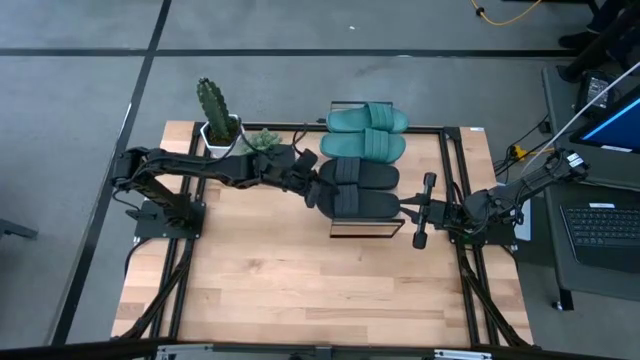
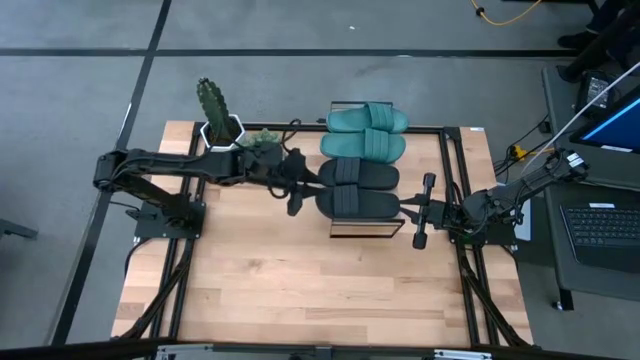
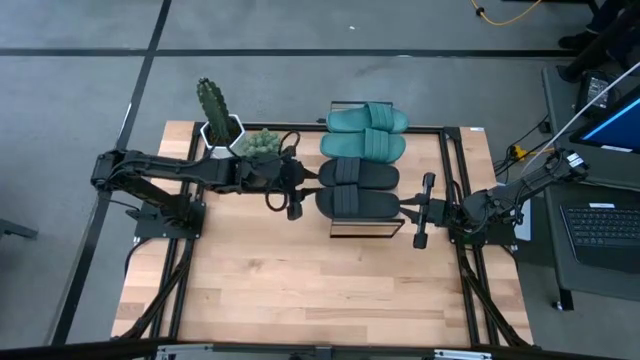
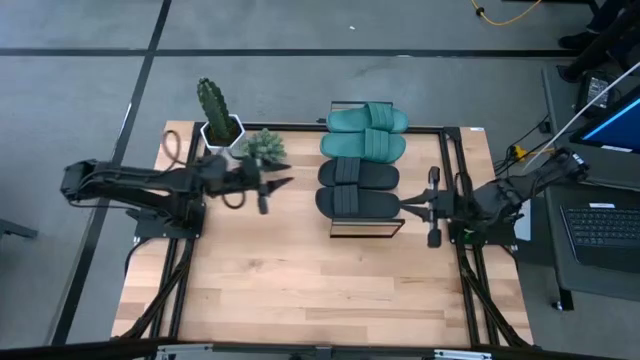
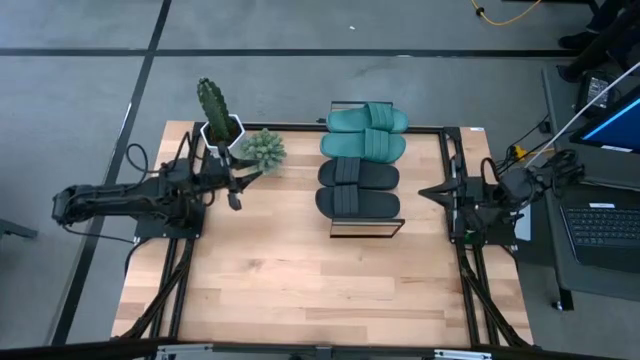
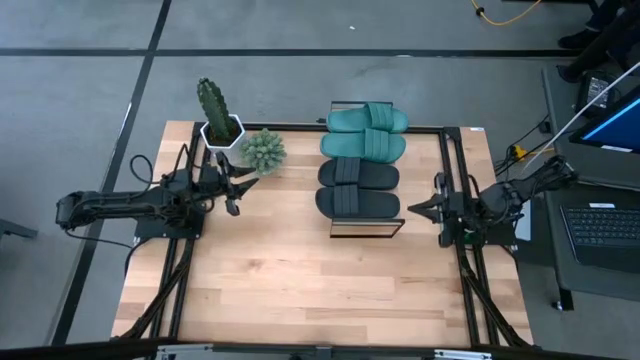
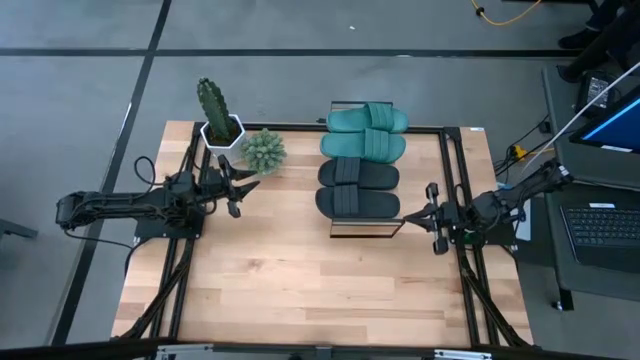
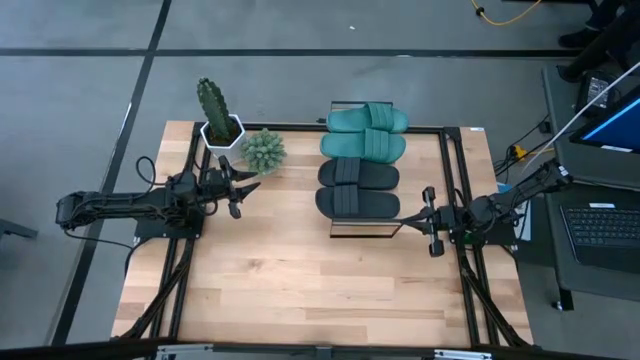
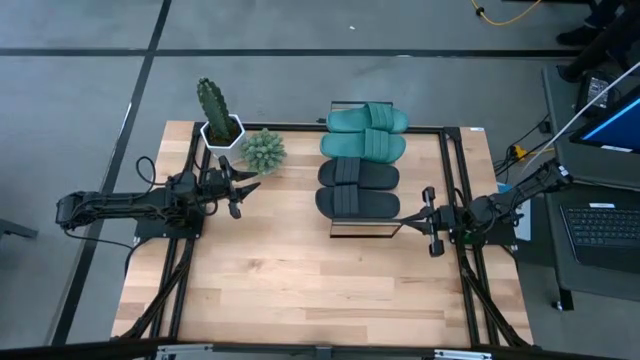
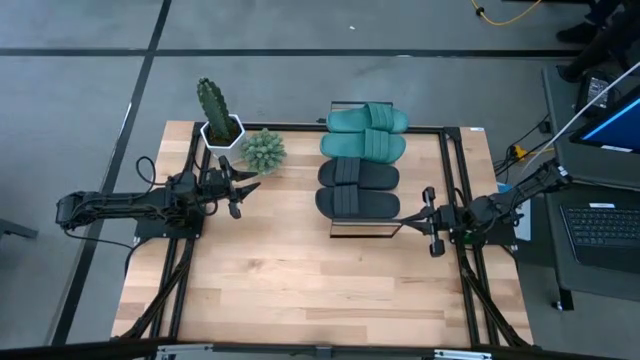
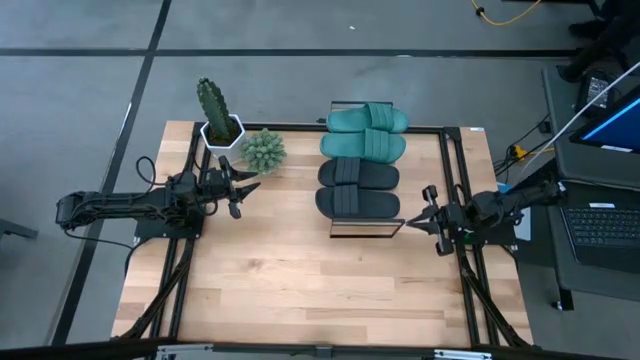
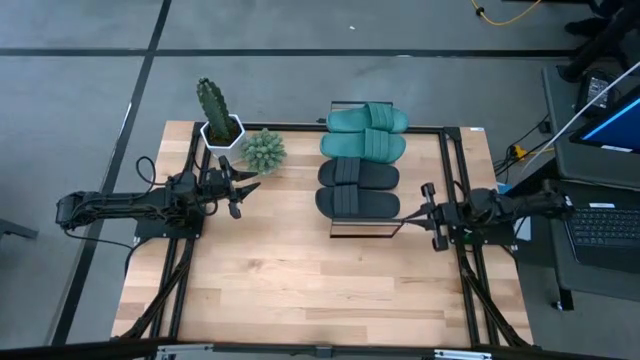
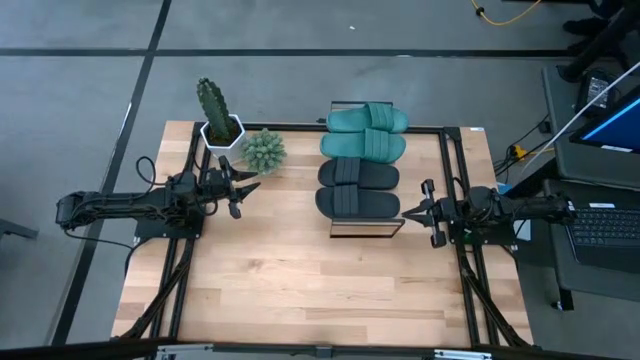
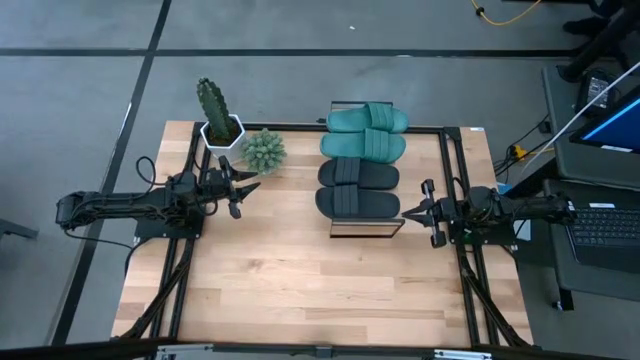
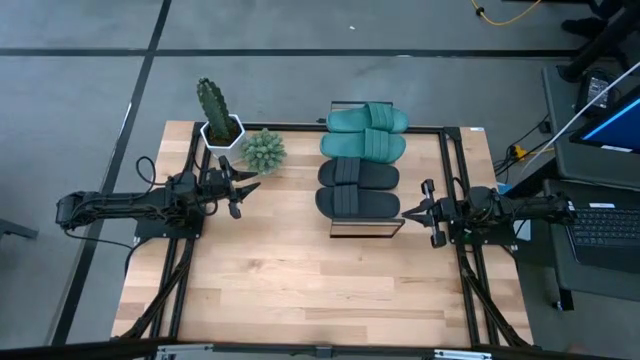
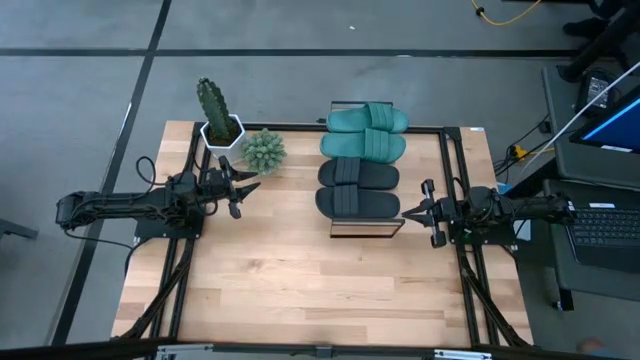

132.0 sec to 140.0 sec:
Task: Pick and place slides into the shelf
Return to Home Position

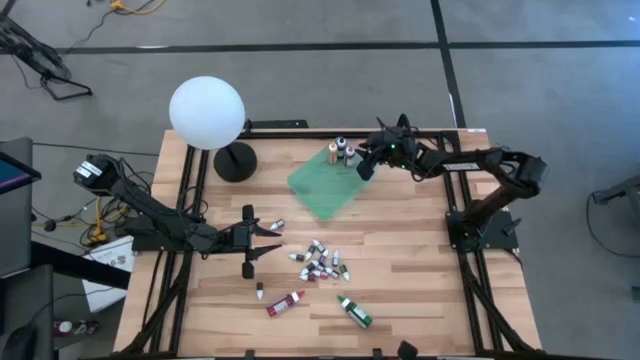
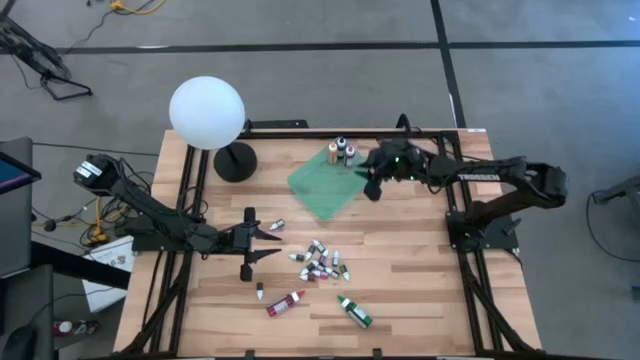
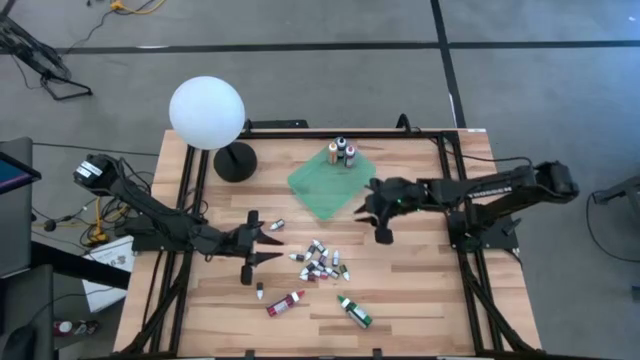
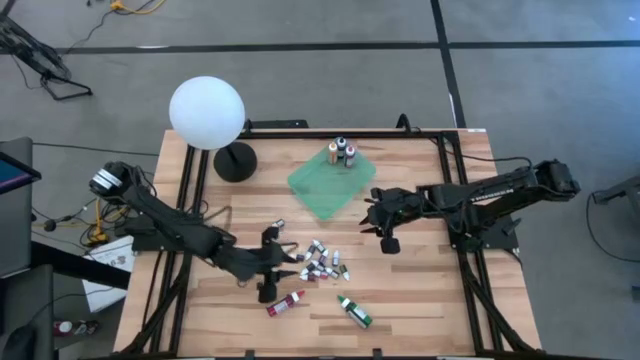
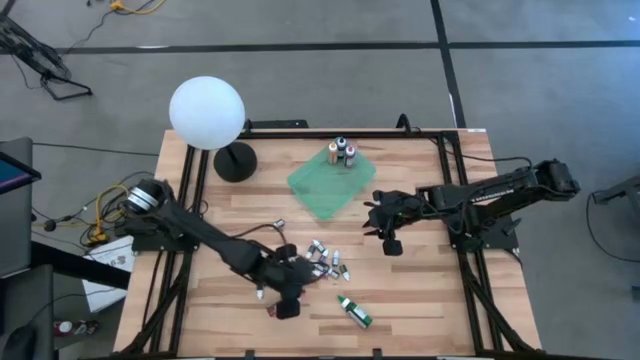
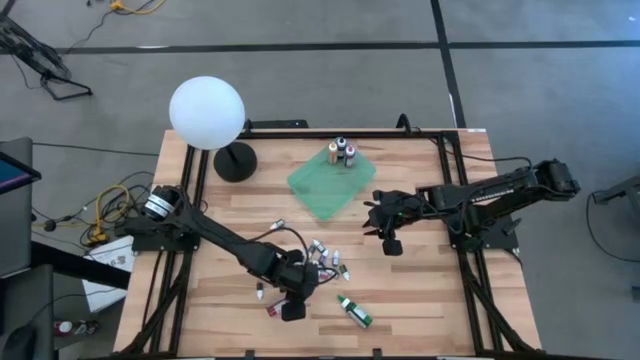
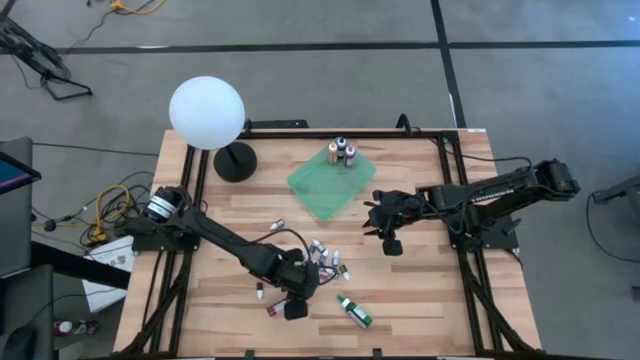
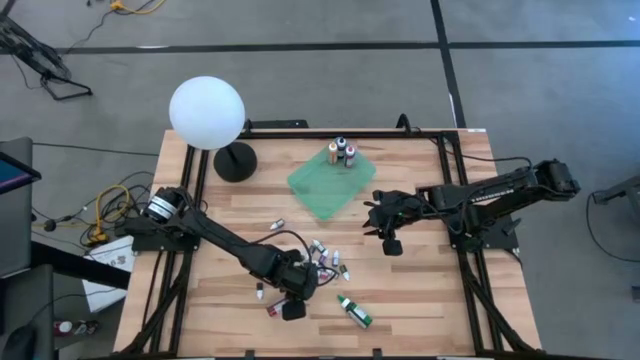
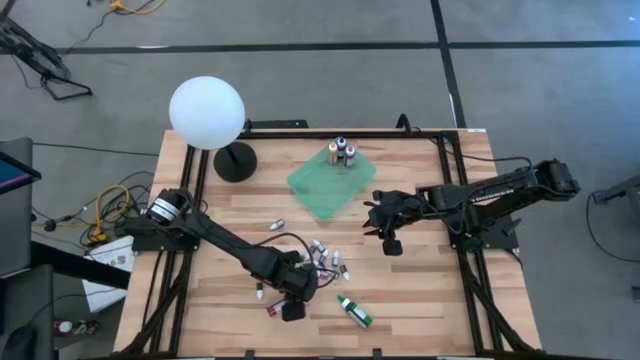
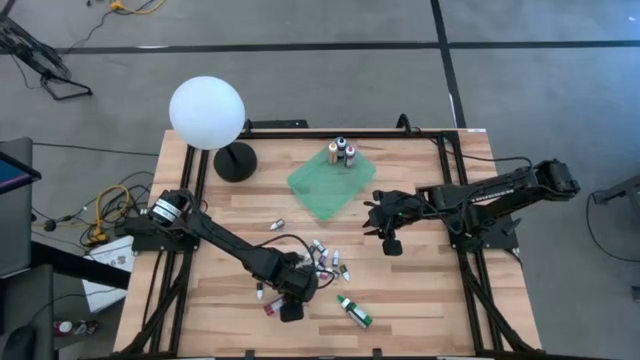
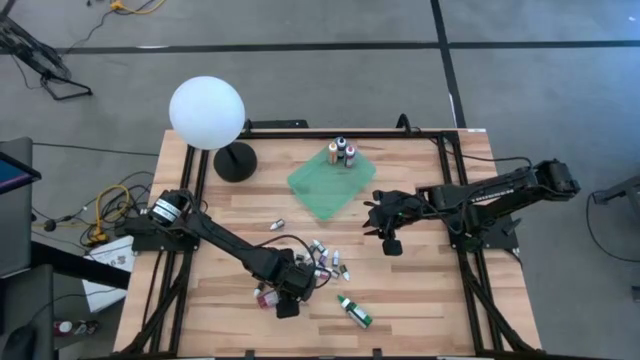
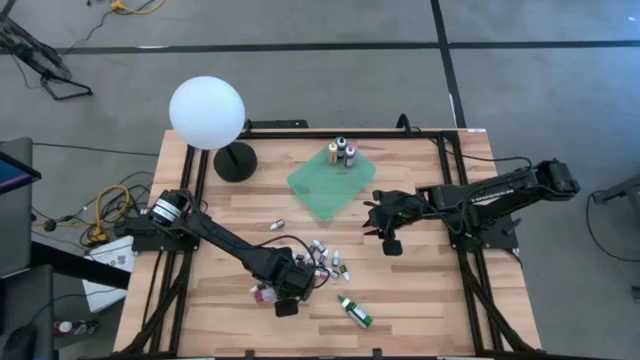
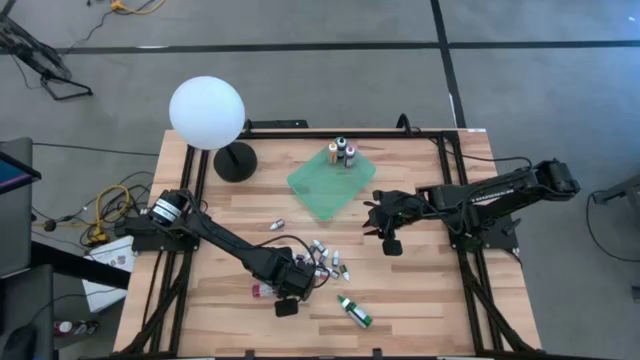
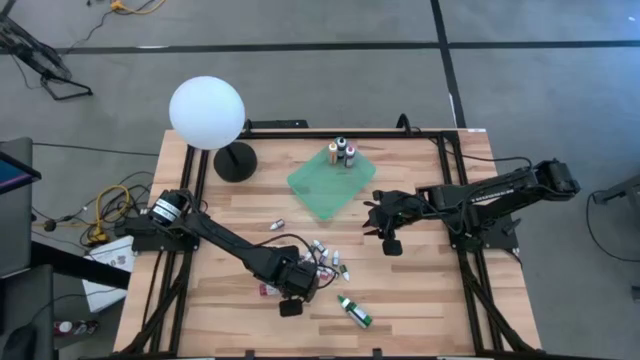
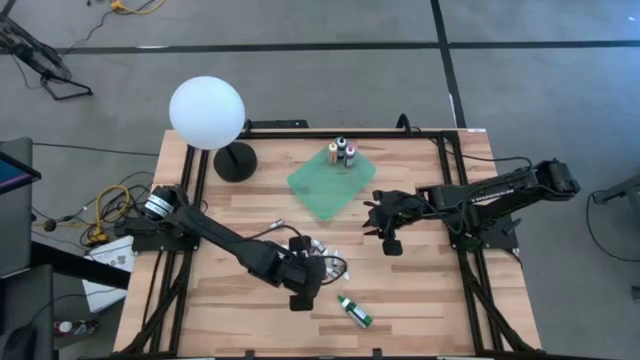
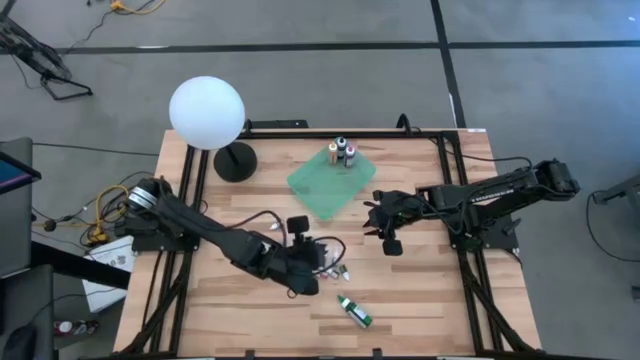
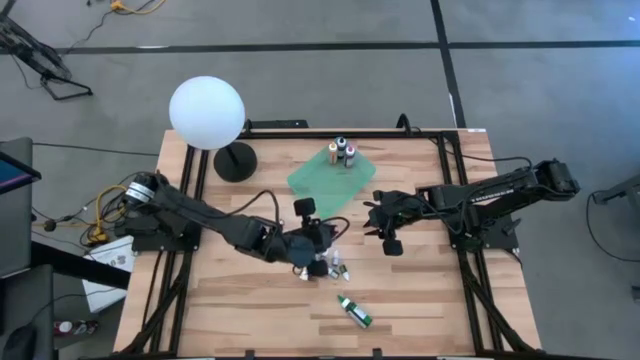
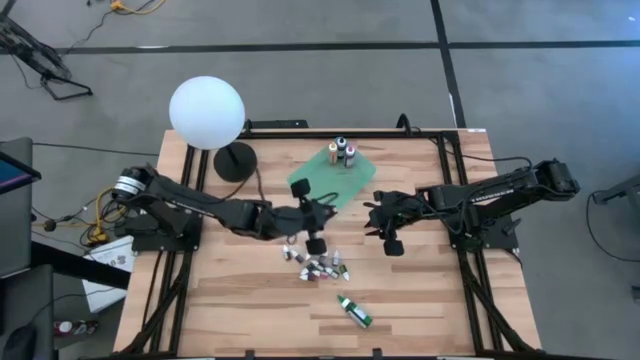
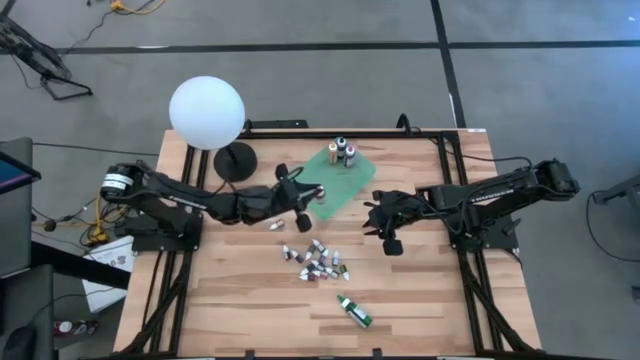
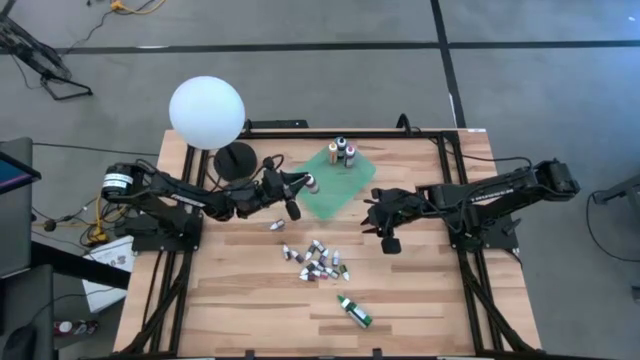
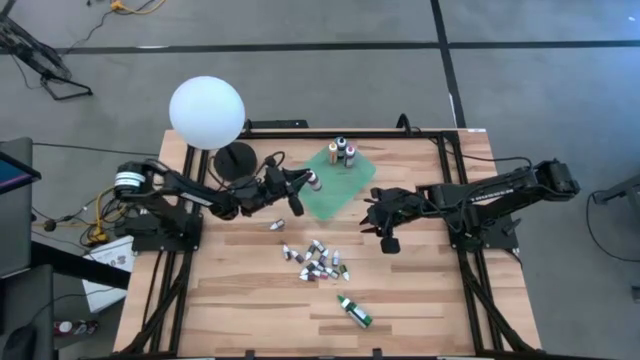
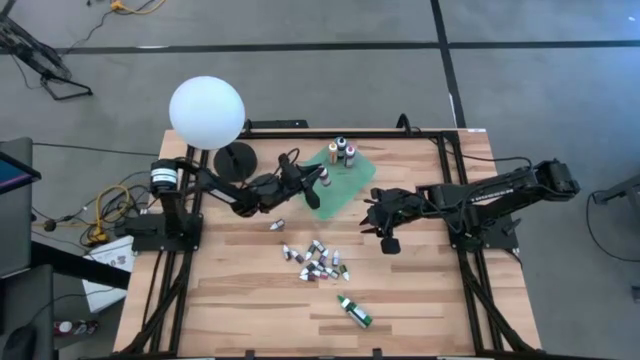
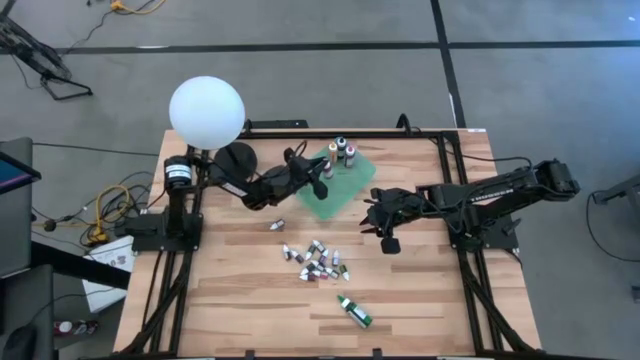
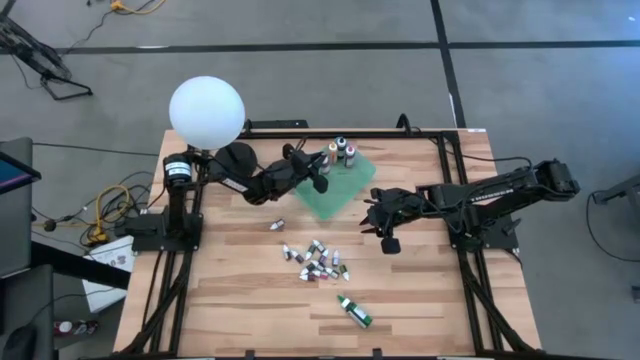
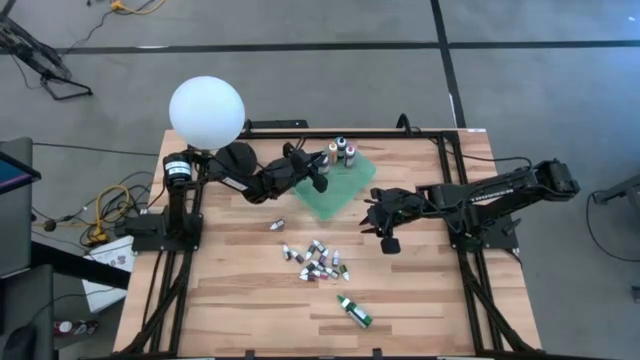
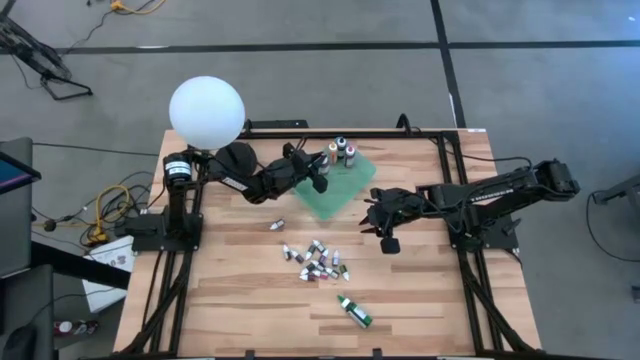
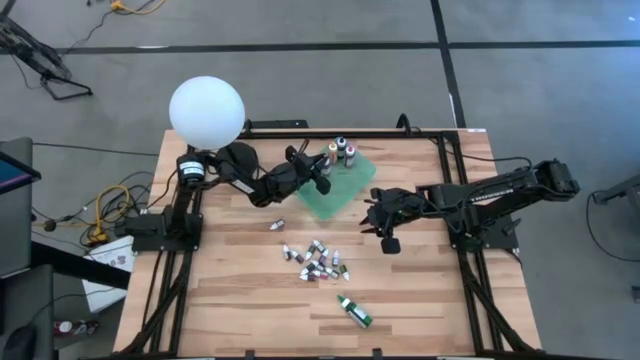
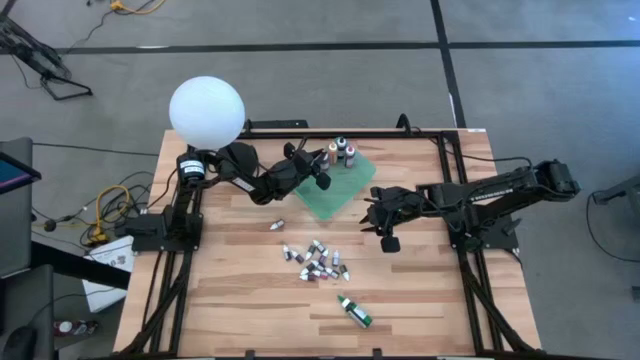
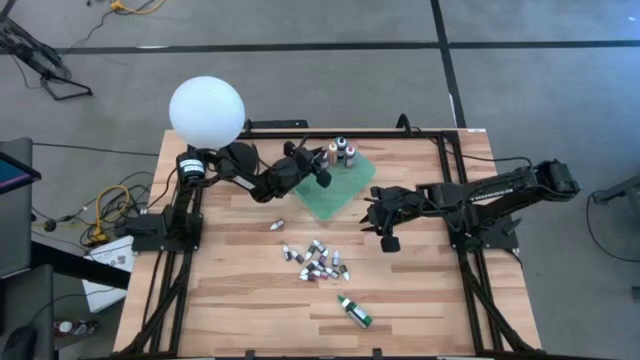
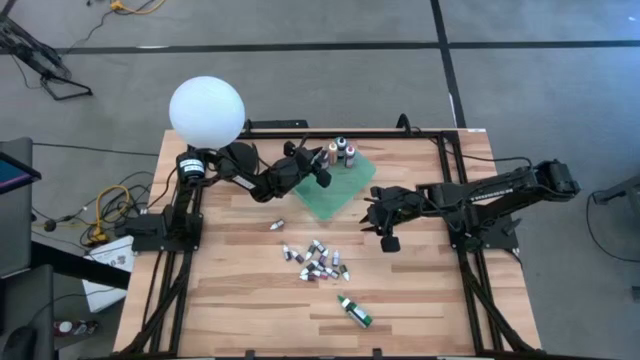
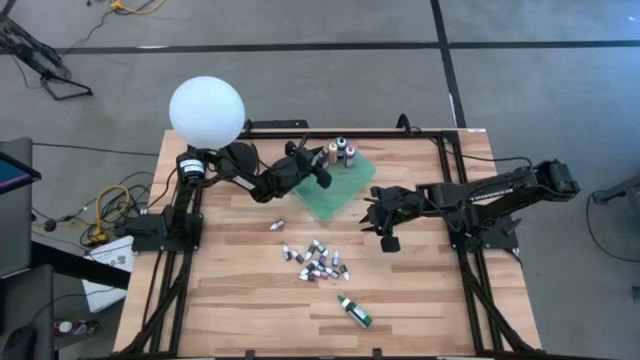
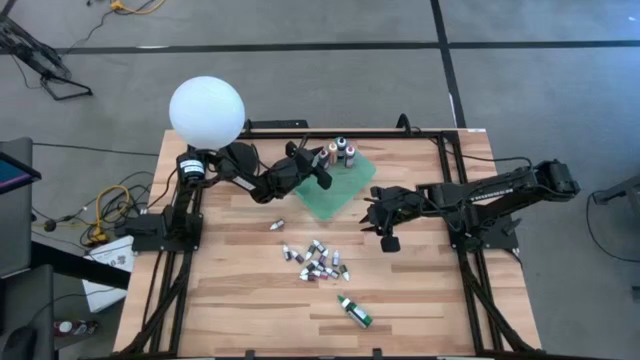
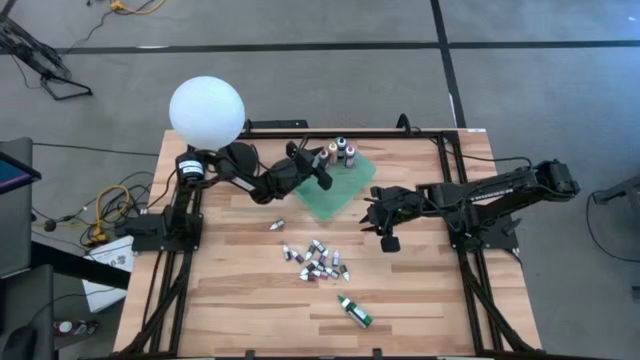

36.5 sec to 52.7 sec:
Task: Pick & Place food coloring
Put the bottom red food coloring bottle into the green bin
